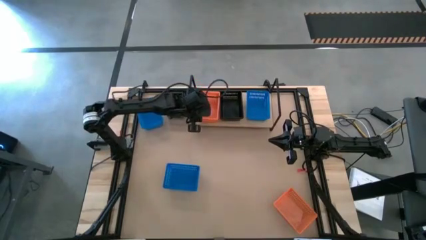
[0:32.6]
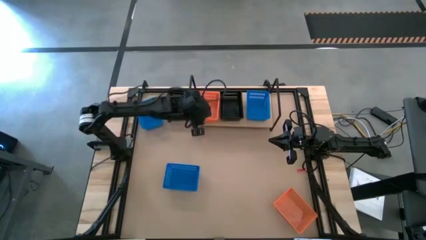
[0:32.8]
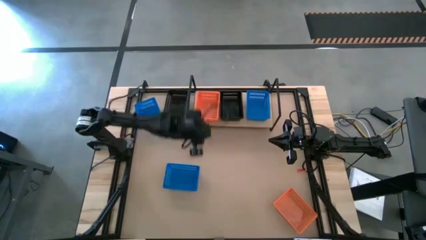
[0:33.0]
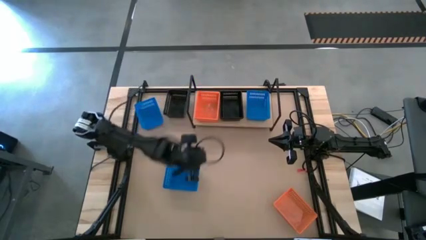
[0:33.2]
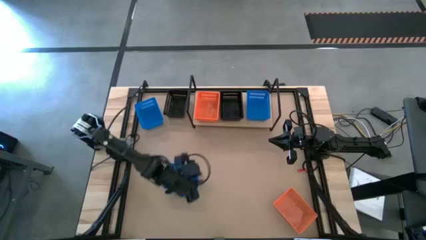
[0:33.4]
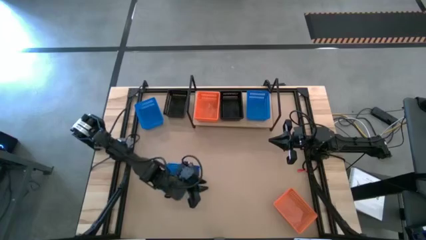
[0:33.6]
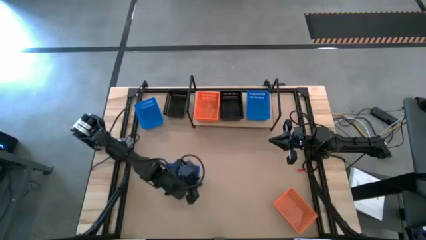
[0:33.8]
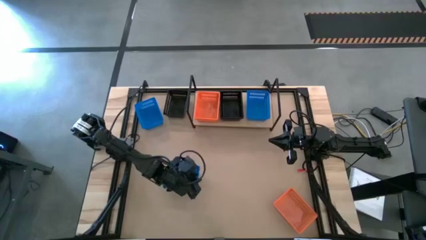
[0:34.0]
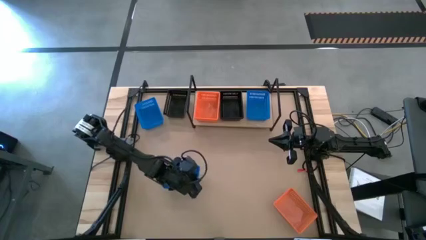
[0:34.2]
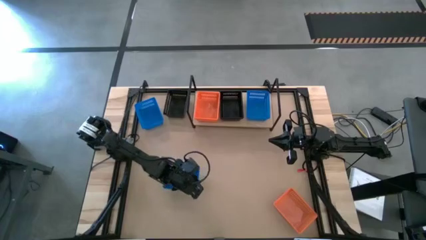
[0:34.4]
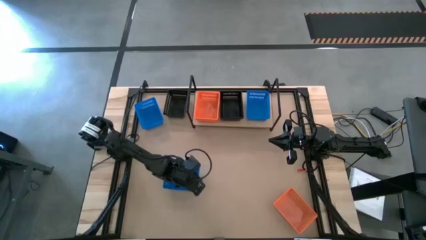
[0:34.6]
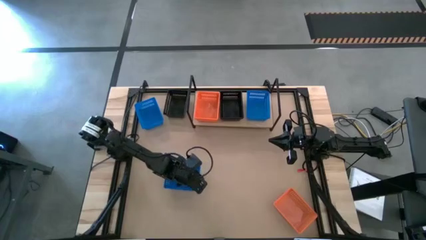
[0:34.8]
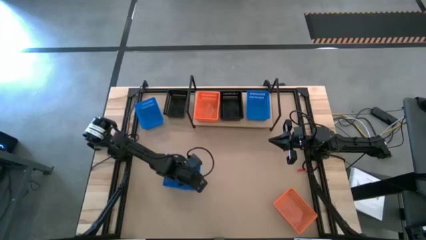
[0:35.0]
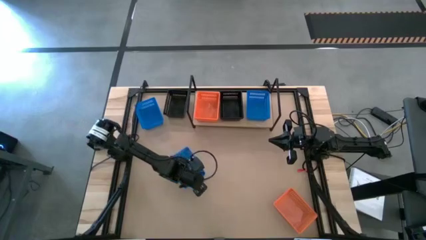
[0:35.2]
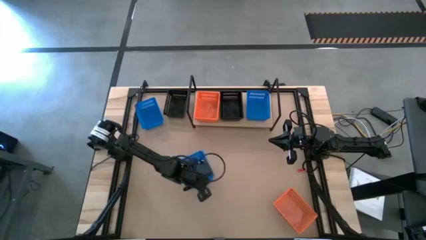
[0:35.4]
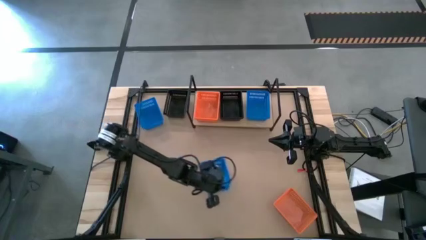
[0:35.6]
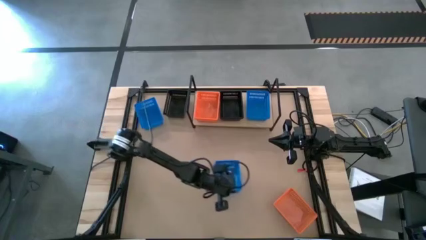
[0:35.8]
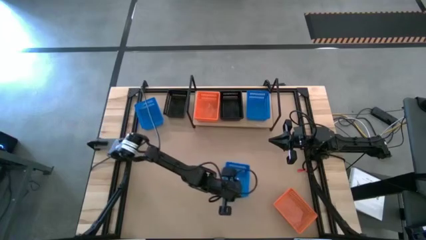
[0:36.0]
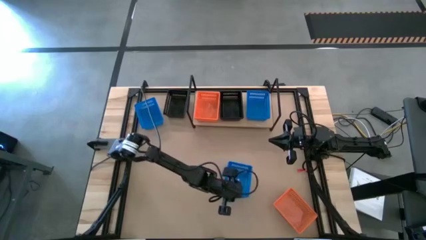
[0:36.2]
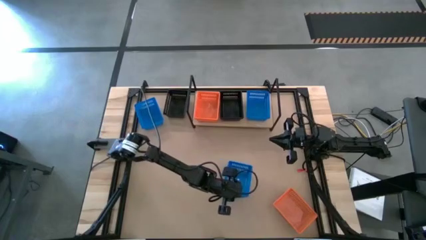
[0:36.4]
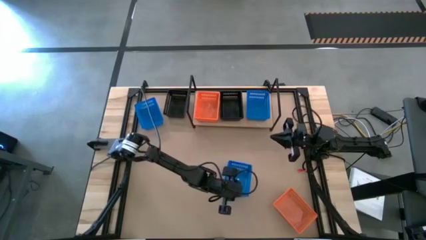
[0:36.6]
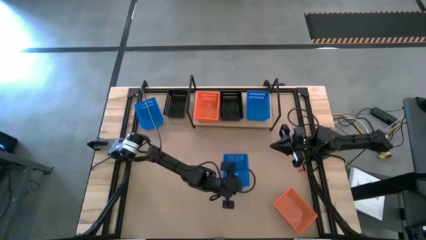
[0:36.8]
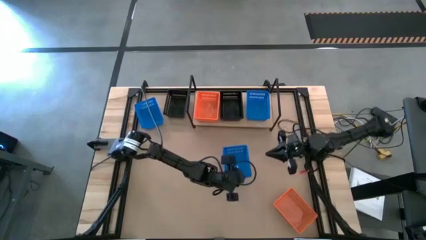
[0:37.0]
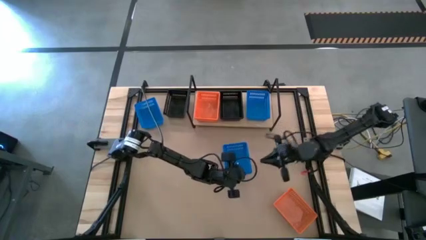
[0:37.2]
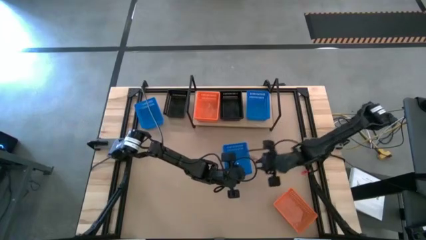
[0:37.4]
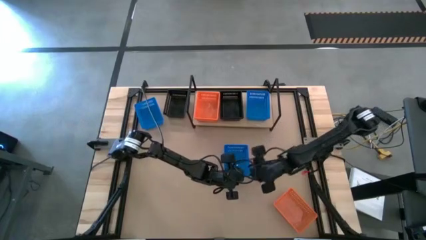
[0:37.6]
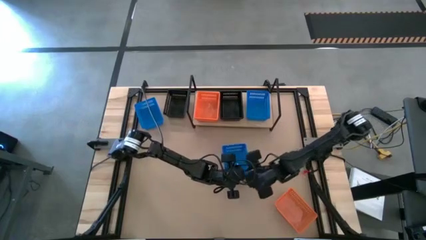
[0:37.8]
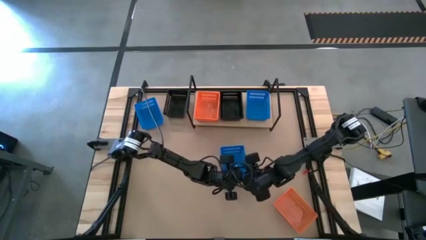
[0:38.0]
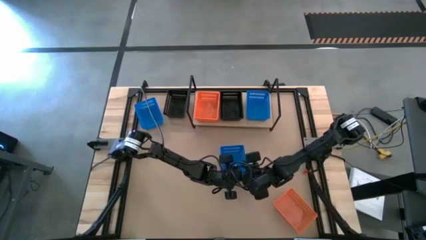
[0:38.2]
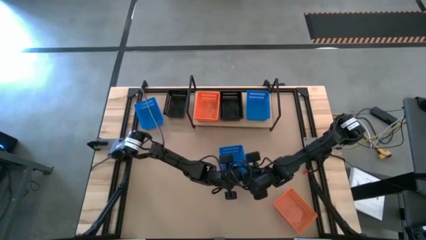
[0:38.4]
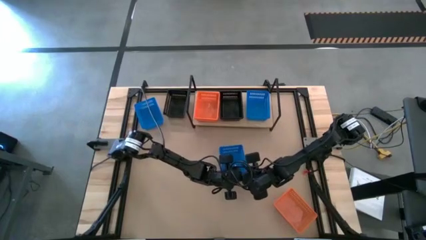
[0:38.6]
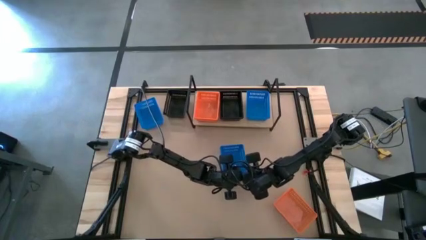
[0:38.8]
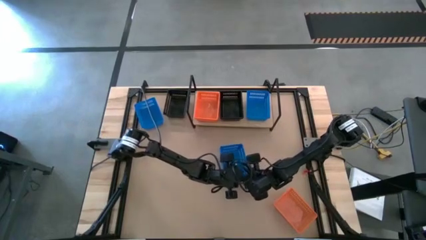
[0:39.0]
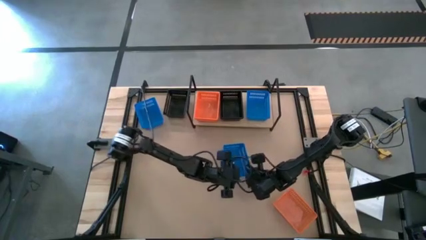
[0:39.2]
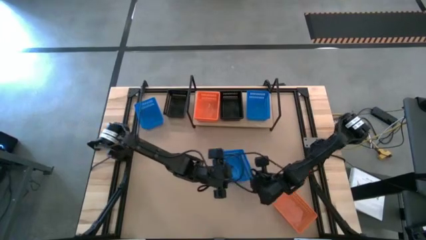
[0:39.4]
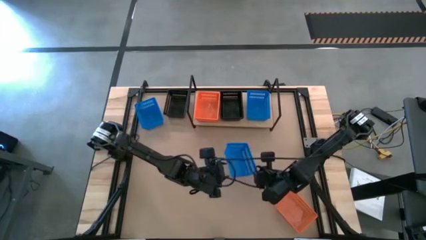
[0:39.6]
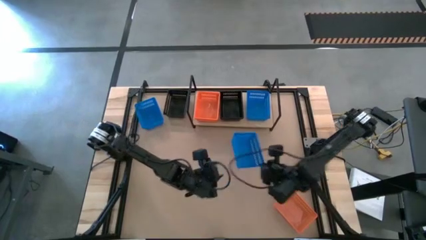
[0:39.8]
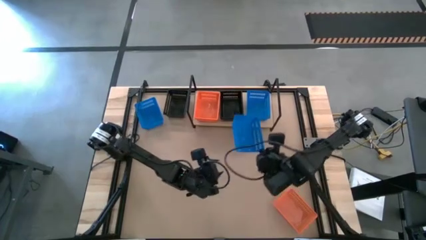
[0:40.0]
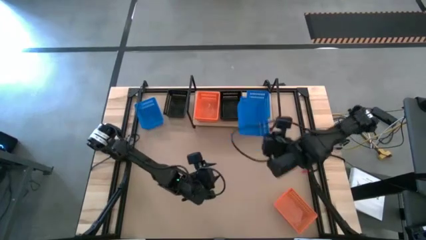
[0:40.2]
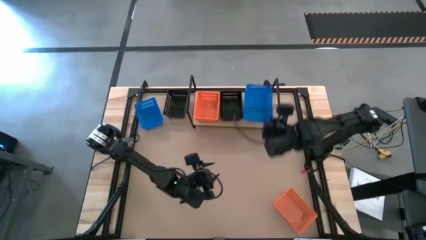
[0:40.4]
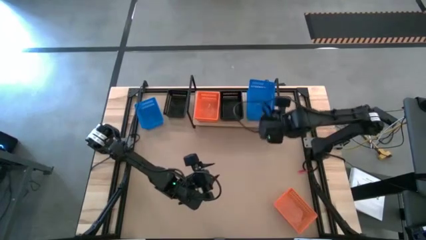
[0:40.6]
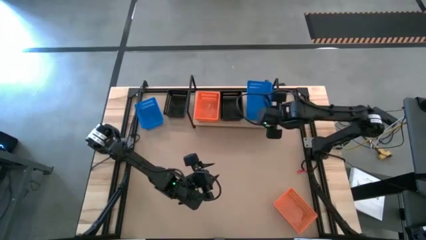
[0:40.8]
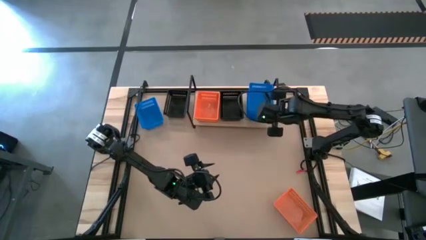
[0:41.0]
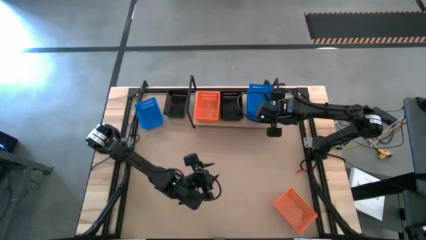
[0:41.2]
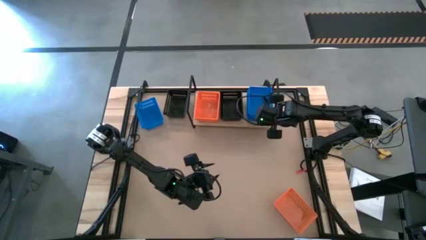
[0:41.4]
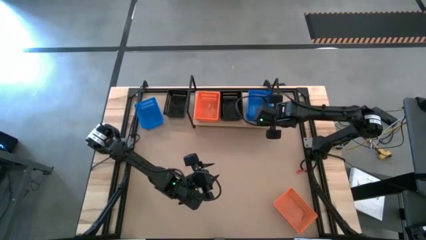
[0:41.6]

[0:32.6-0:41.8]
Task: Stack baskets on shelf by color
Stack the bottom blue bin on the blue bin on the shelf

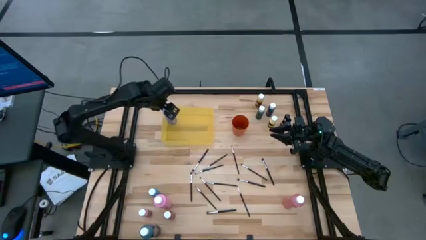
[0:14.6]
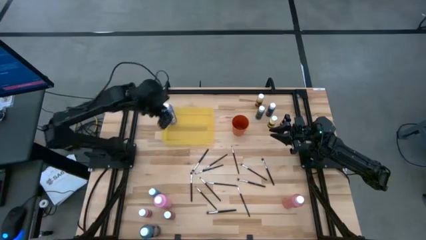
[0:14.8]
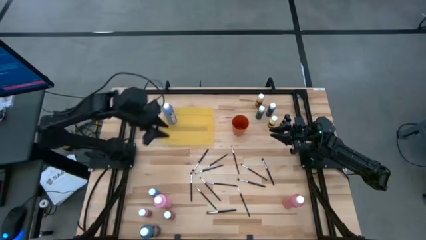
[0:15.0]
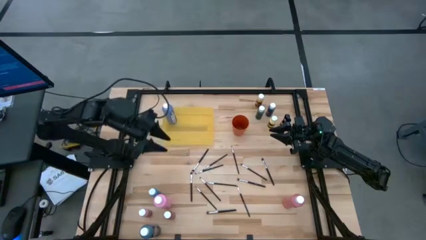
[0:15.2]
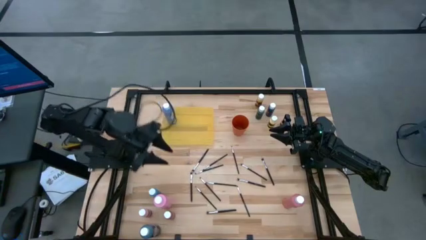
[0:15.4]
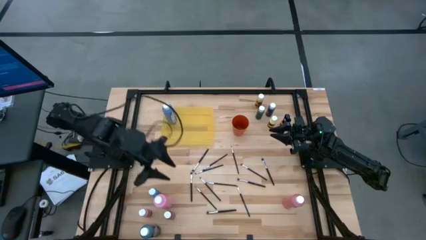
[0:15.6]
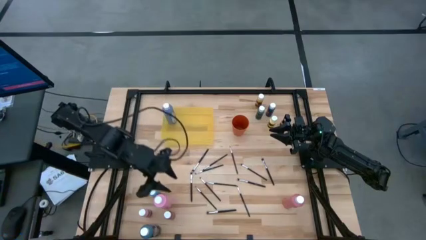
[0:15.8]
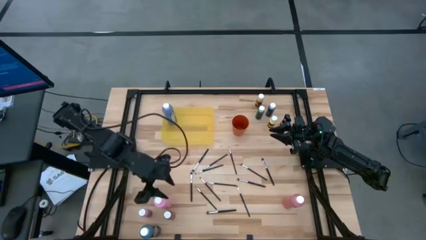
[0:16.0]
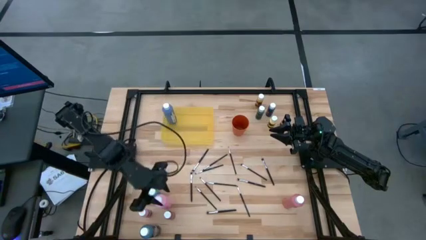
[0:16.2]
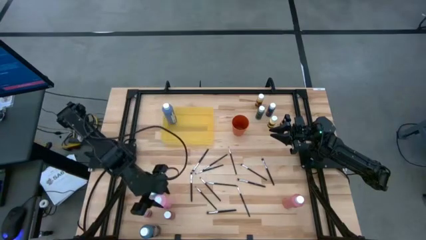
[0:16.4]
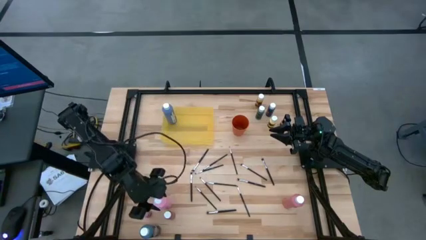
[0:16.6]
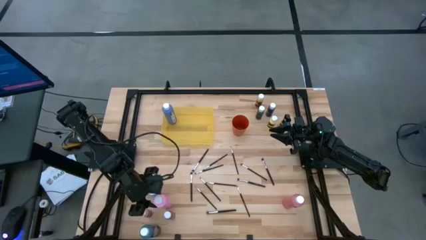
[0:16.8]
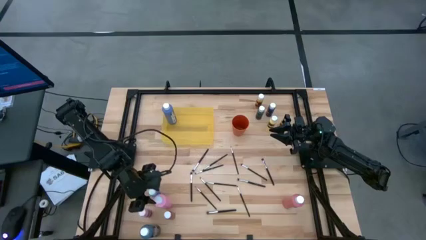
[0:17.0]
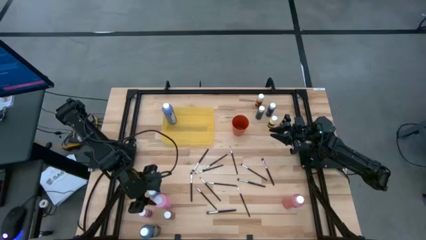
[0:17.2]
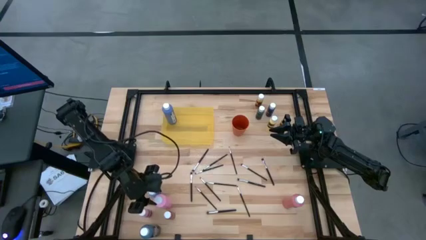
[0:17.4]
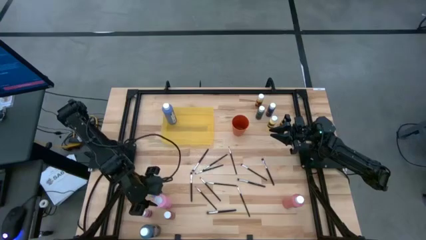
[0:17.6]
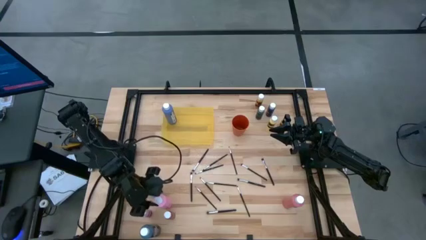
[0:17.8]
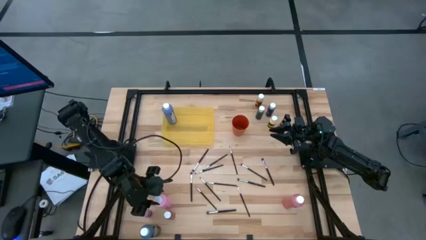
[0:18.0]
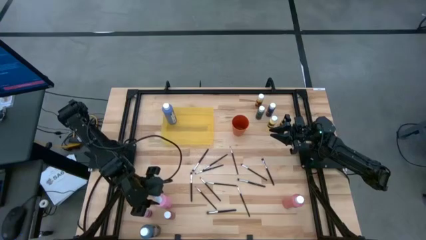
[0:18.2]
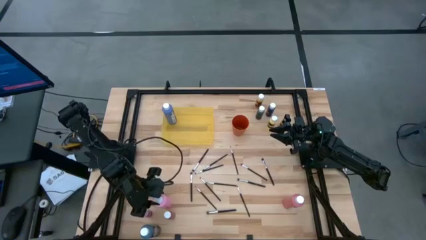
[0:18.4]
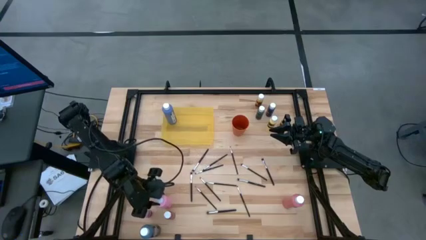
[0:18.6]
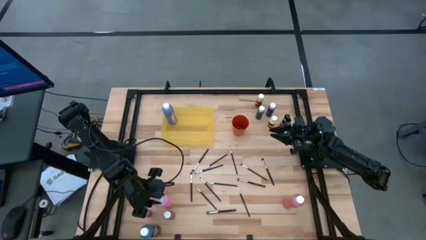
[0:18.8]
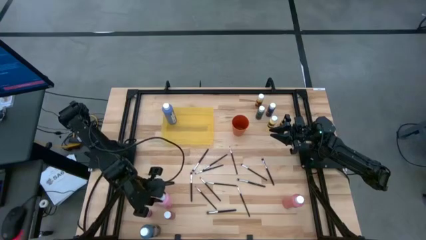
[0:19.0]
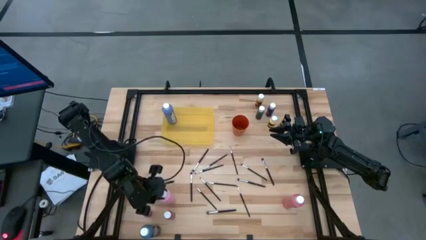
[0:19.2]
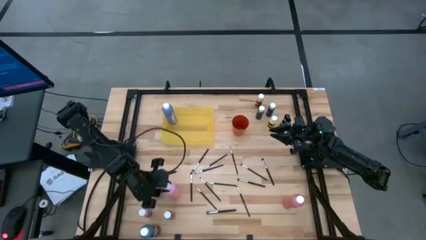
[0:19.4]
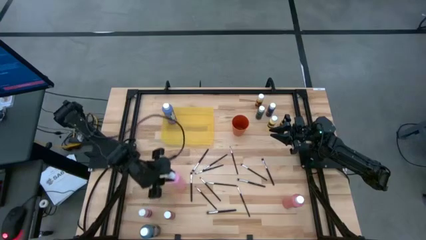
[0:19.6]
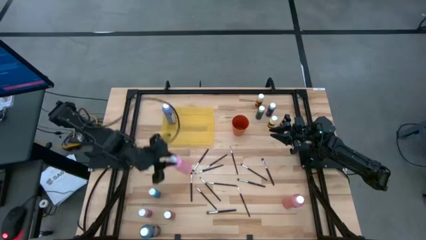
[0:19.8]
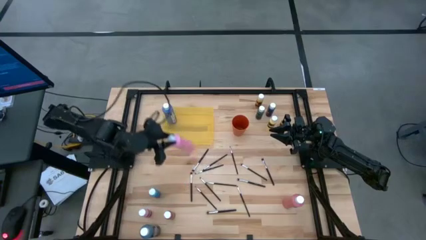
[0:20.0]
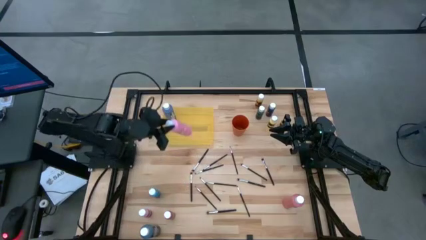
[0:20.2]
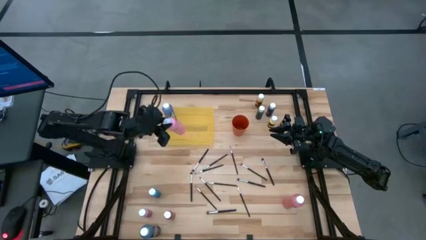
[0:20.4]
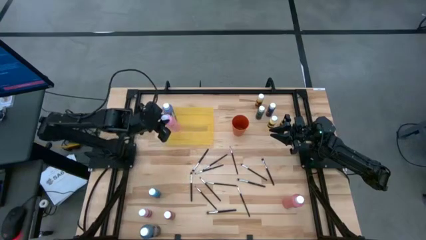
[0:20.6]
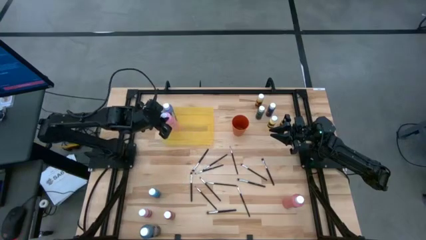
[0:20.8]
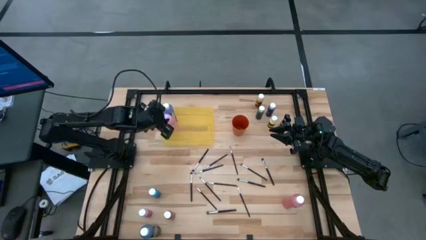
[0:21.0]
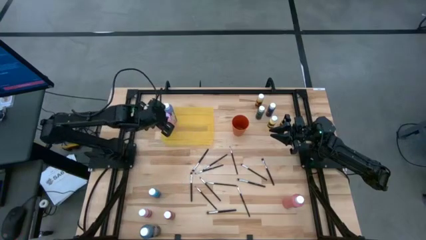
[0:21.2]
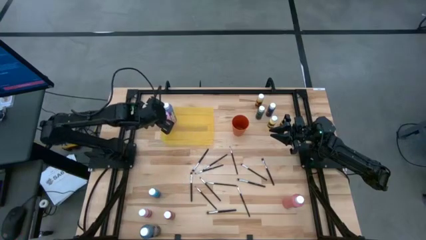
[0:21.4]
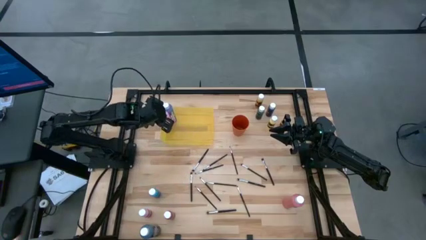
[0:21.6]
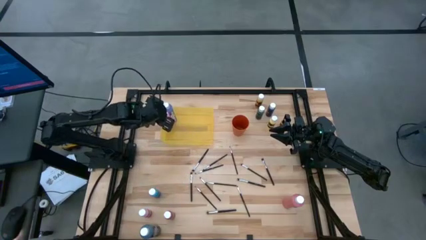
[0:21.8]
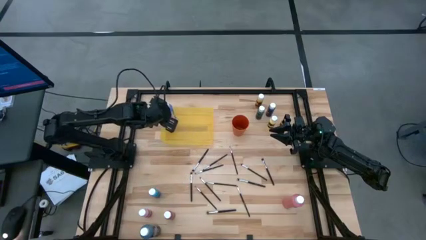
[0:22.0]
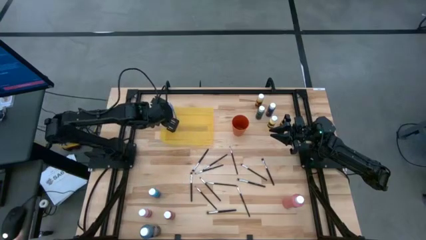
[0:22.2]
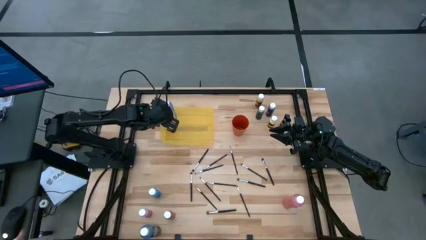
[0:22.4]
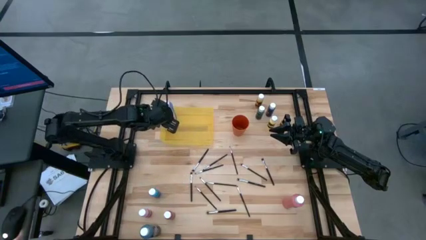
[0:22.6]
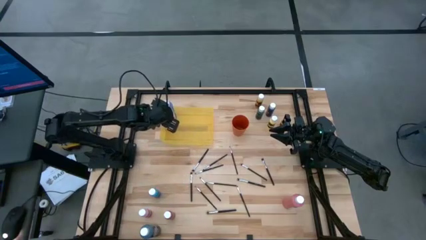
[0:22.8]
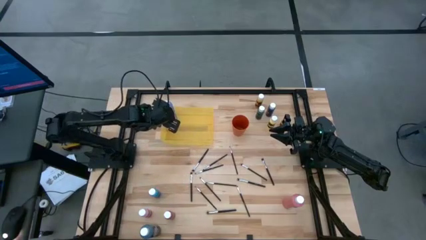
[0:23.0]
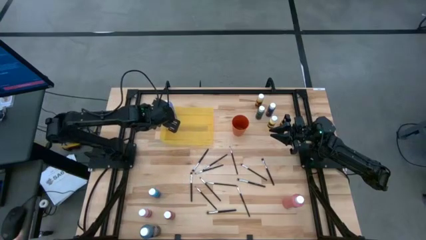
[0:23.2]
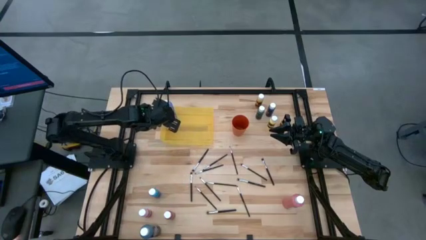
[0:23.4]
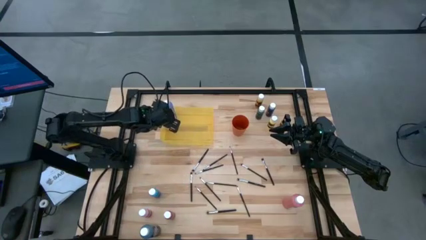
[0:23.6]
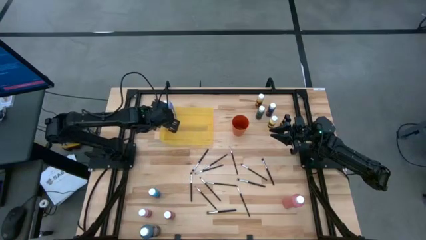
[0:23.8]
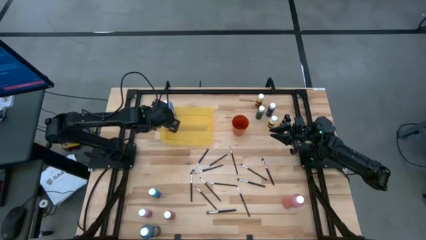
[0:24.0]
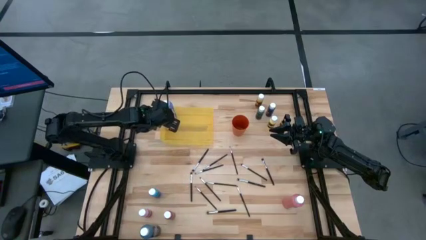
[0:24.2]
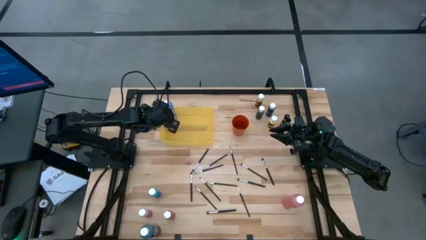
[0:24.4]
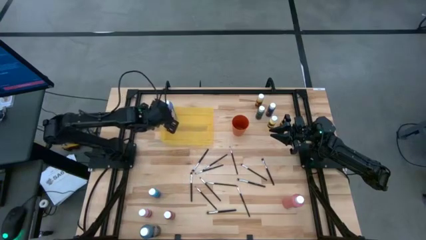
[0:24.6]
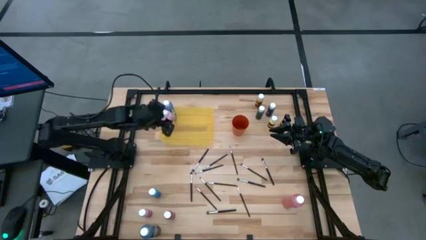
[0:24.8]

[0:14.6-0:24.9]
Task: Pick & Place Paint Supplies
Put the top pink paint bottle into the yellow bin
